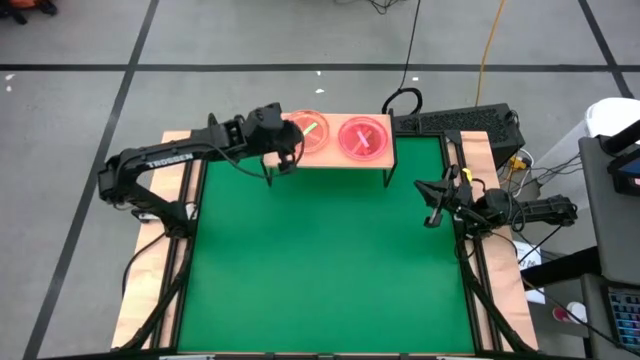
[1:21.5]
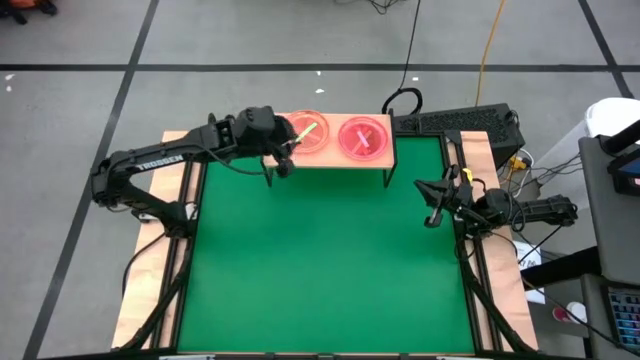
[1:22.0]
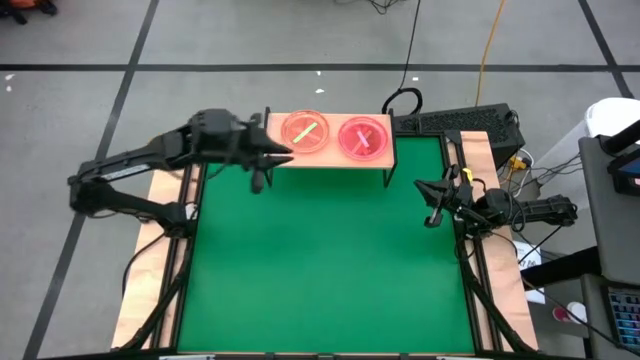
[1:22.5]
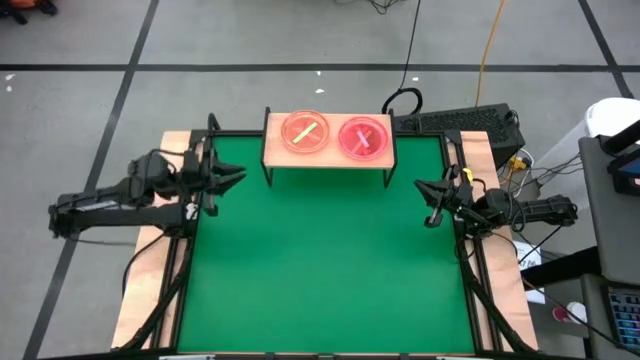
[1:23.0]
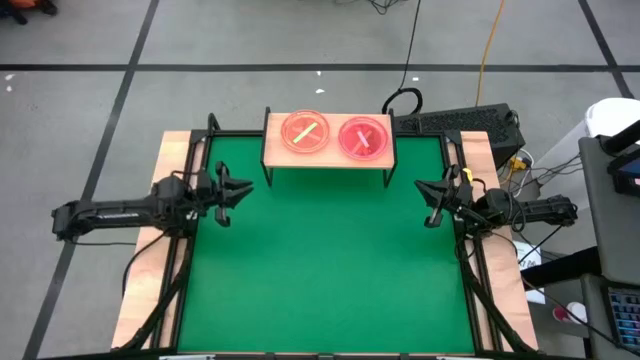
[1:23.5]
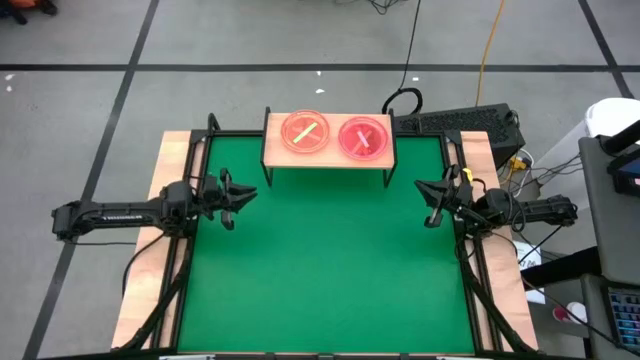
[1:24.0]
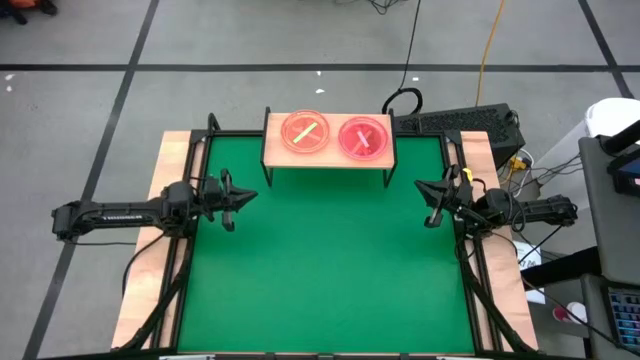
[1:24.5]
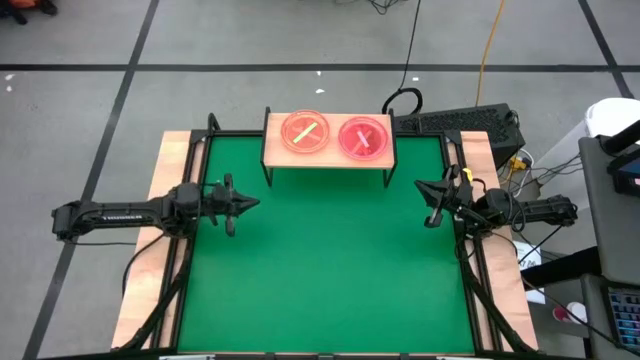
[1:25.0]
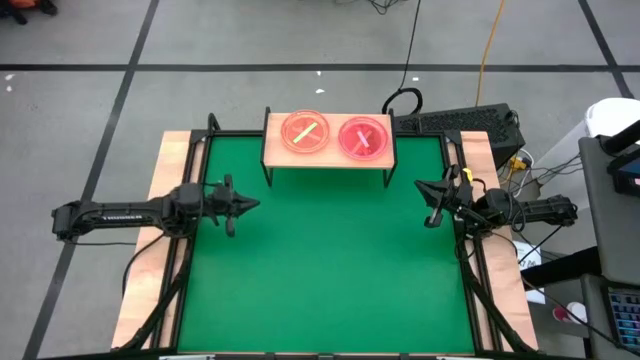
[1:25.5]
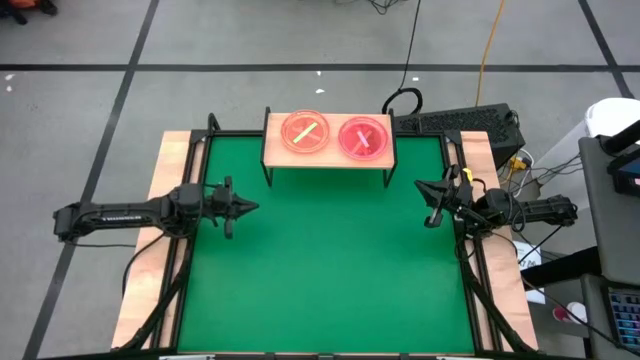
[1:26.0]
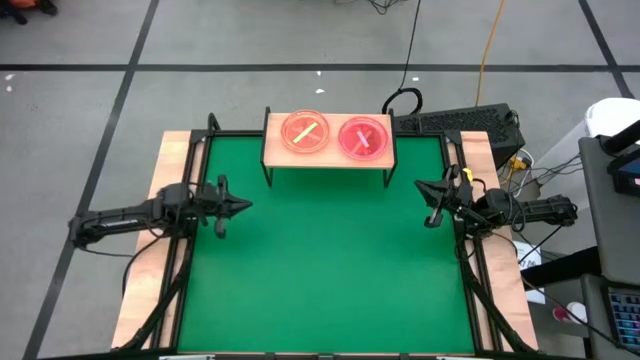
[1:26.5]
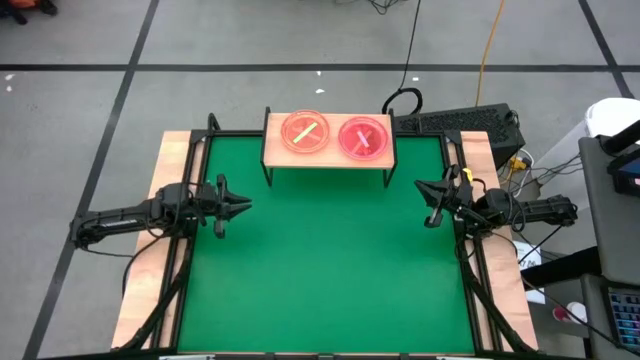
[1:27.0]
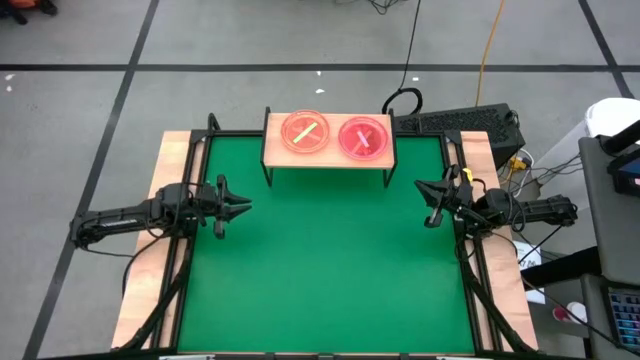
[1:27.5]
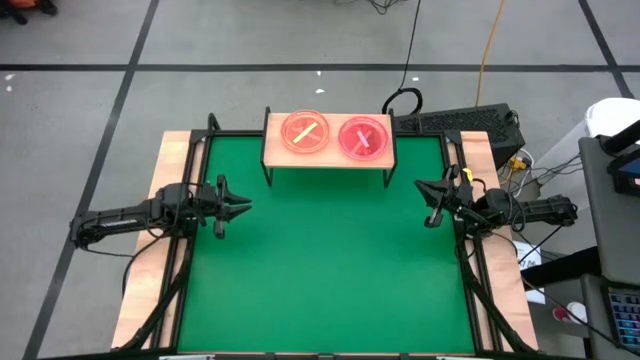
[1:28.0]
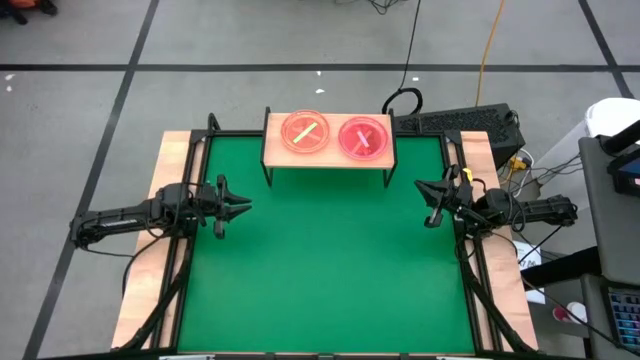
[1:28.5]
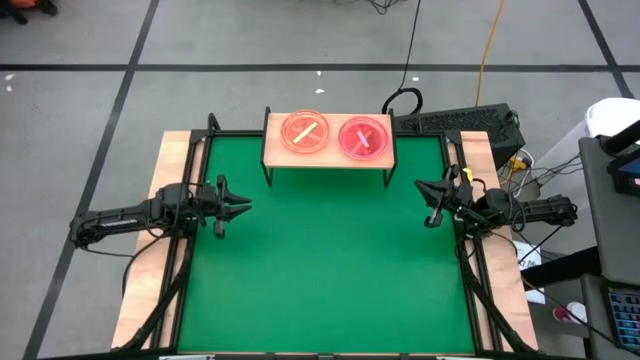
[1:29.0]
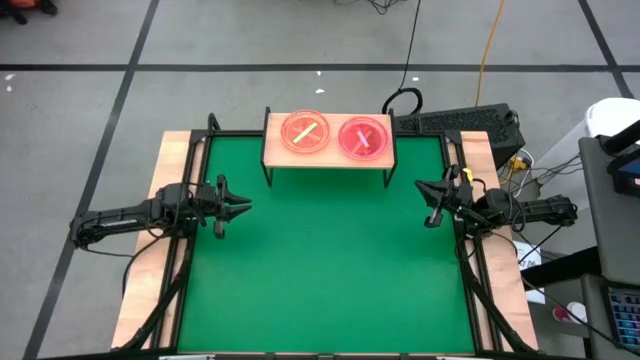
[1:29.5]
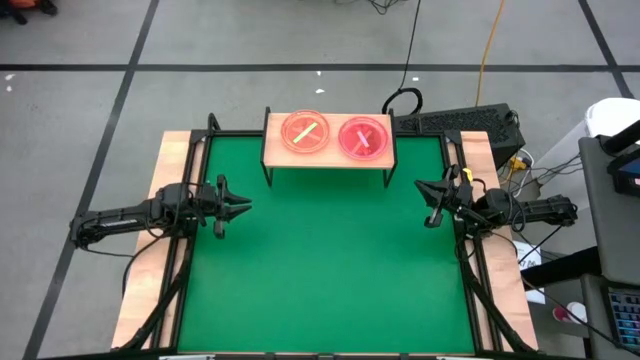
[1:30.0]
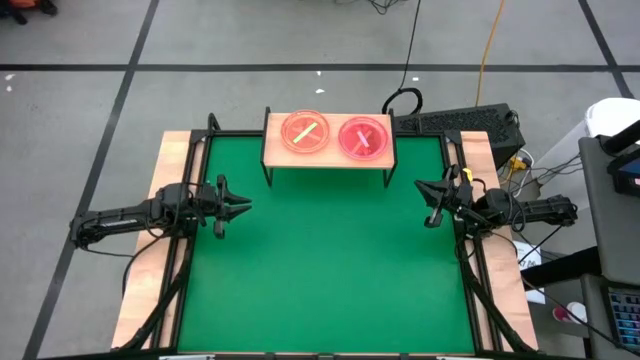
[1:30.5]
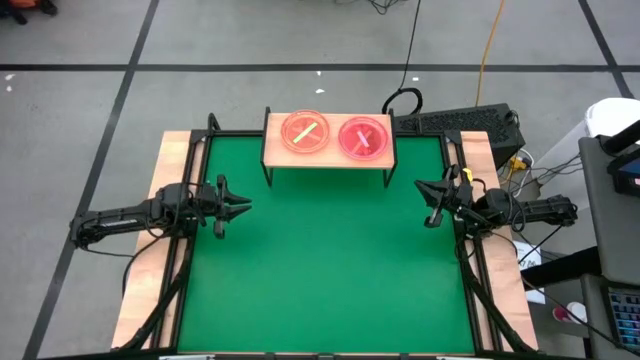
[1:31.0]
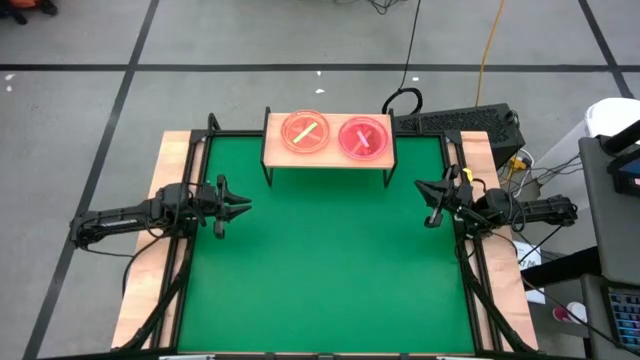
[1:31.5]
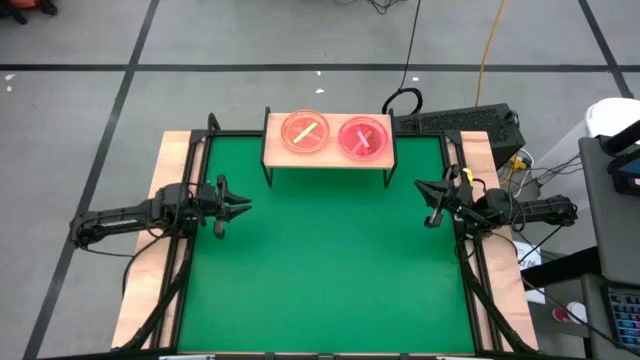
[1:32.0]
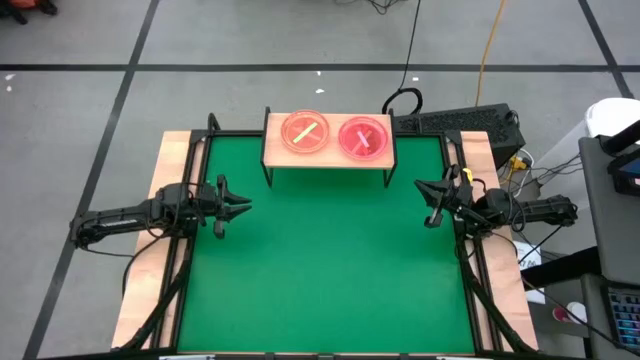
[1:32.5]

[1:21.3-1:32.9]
Task: Place and stack plates onto a shelf
Return to Home Position

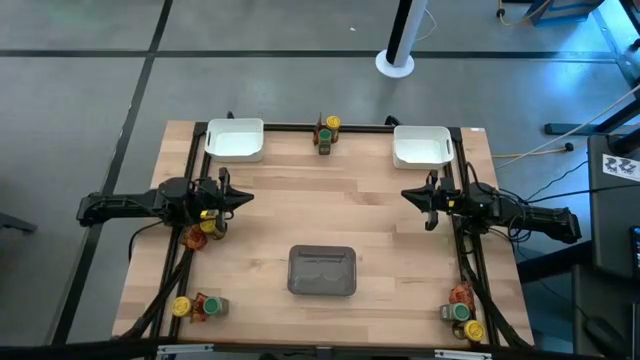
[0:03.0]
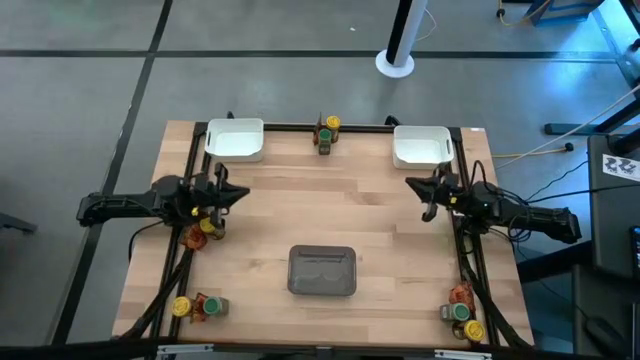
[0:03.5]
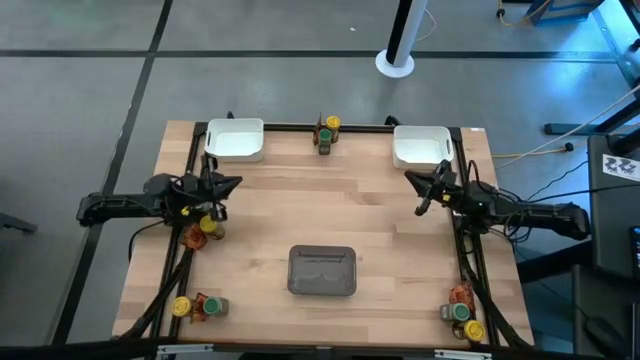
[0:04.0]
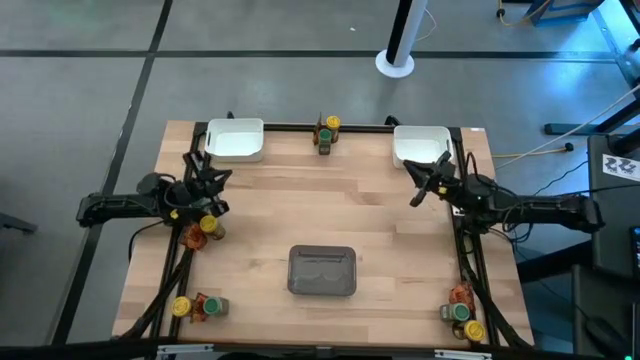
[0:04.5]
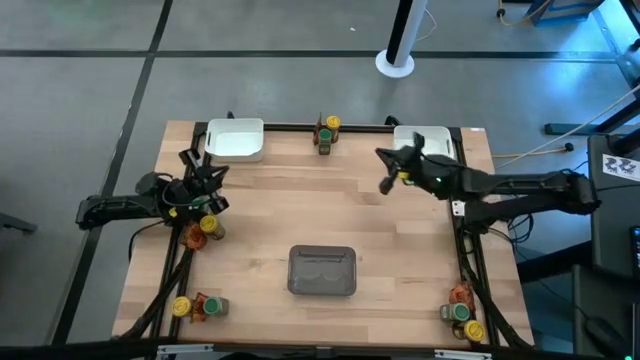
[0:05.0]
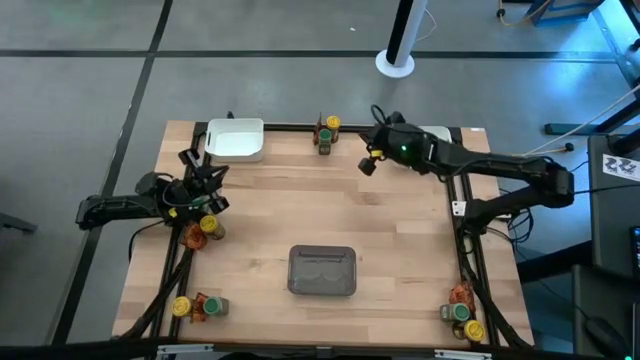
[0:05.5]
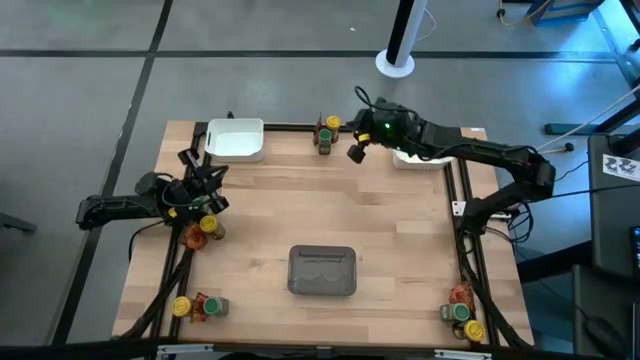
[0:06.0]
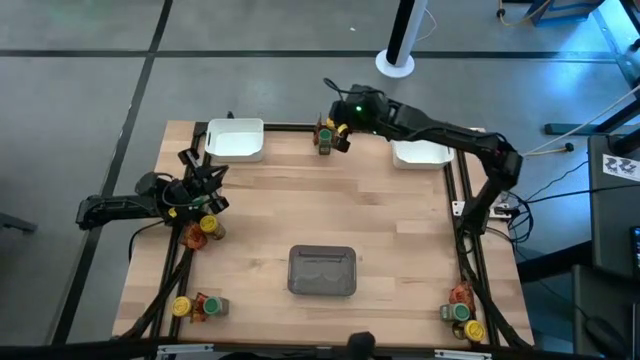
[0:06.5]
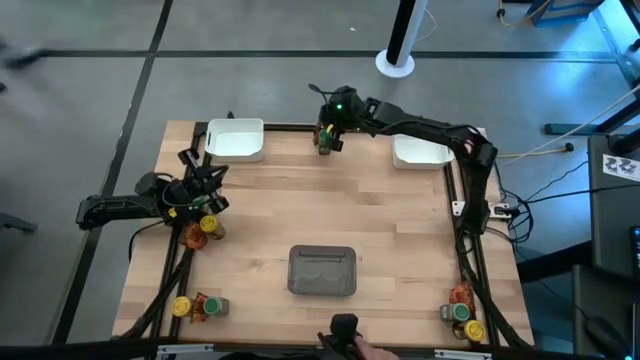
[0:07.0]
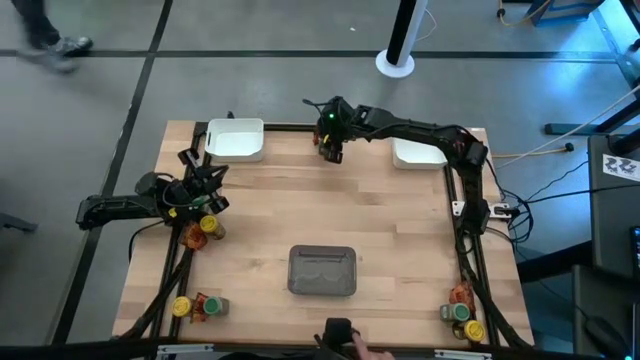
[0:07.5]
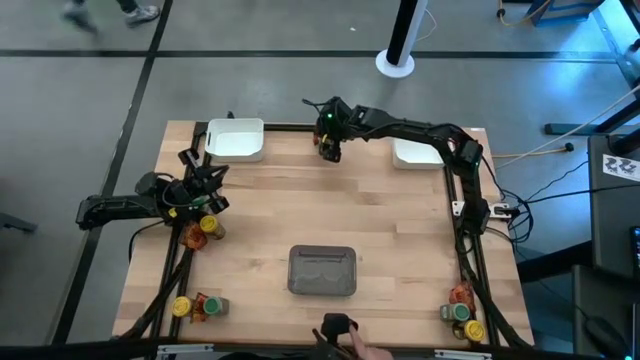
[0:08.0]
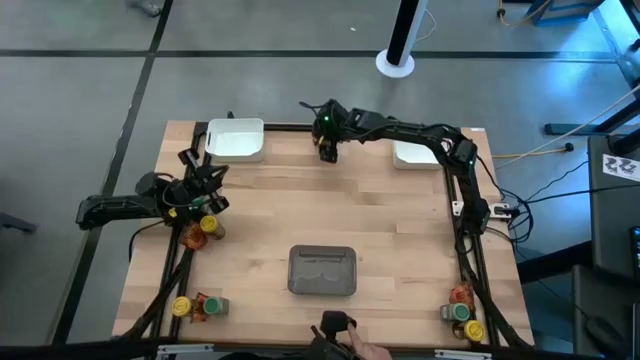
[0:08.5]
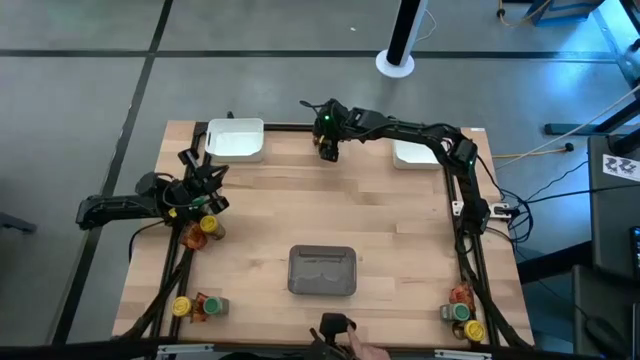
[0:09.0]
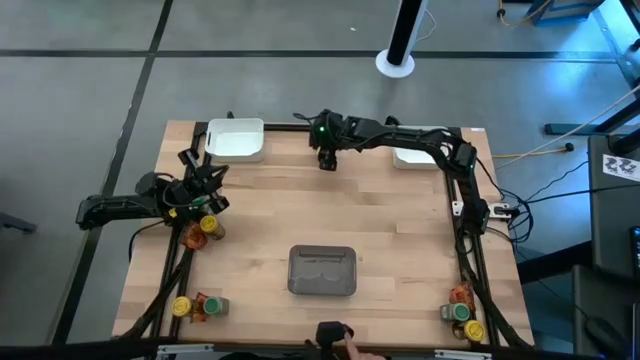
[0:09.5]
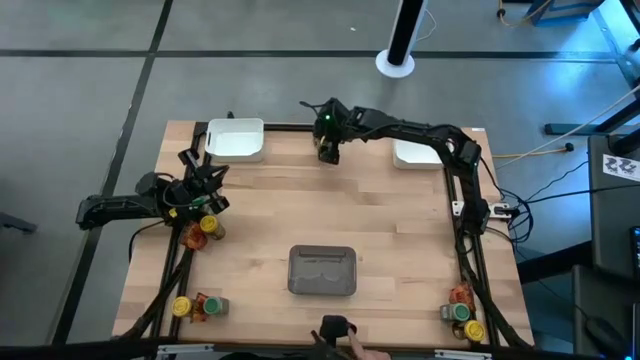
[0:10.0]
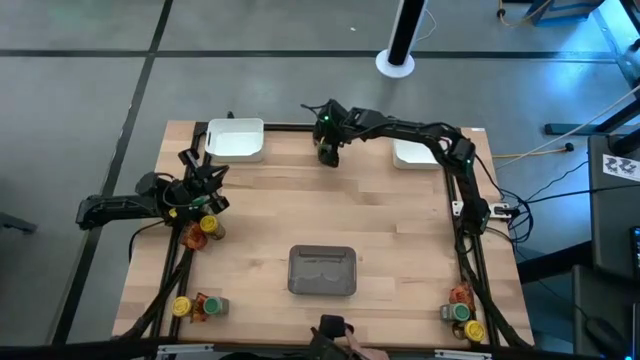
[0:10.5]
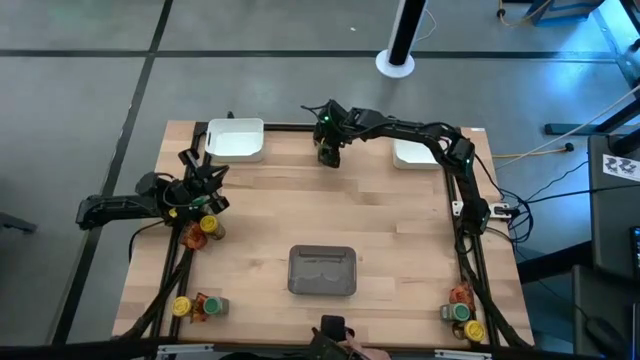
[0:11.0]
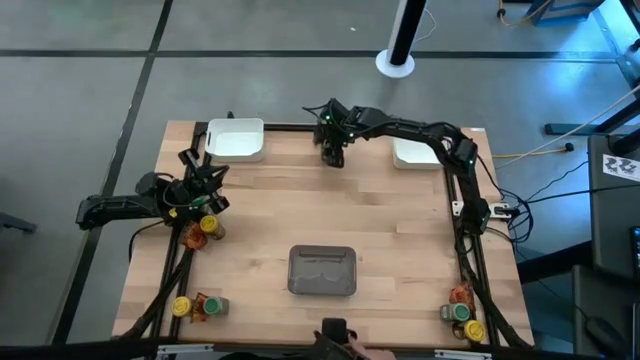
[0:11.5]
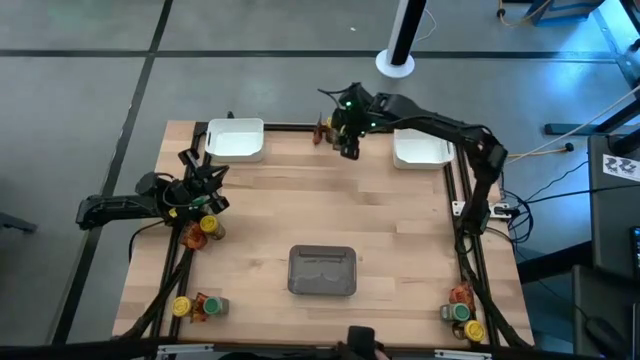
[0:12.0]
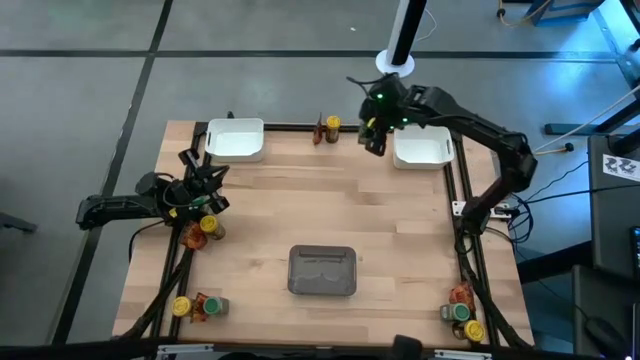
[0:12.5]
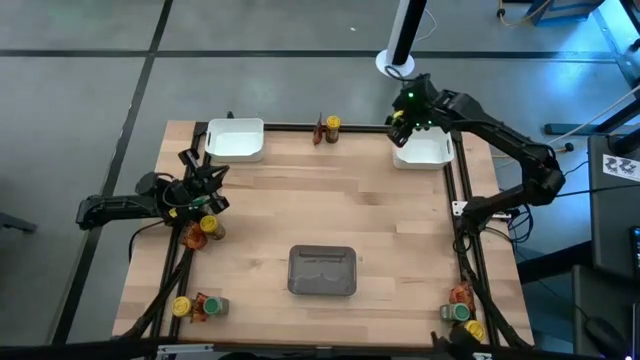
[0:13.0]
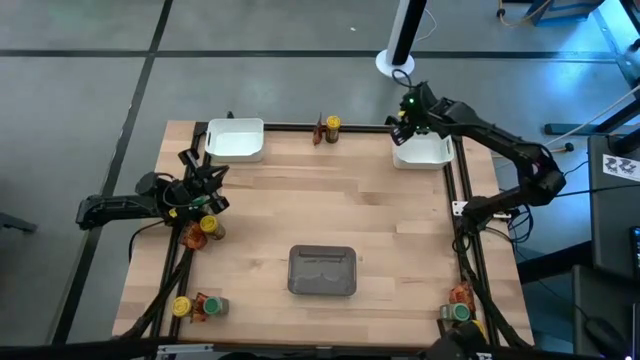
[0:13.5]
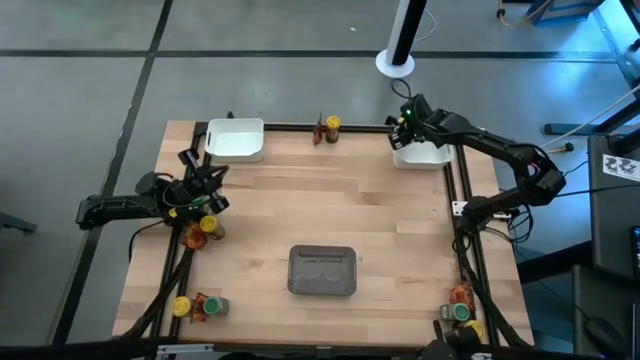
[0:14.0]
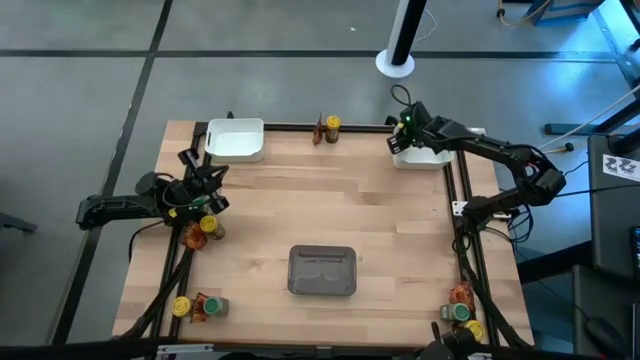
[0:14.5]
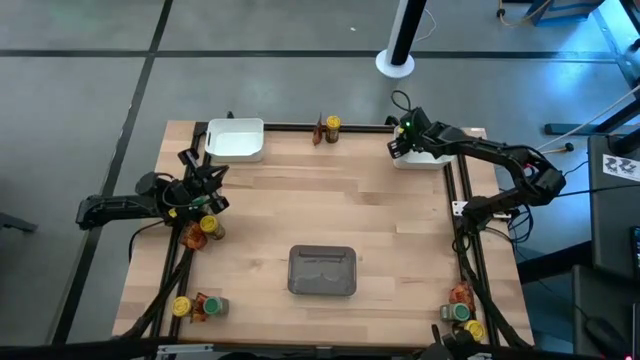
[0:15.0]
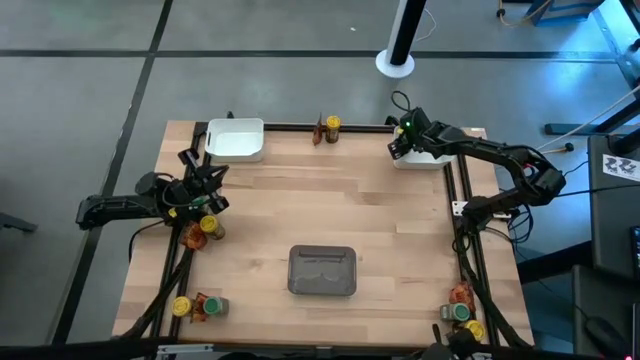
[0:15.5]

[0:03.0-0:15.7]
Task: Sort spices by type
Put the top center green seasoning bottle into the right white bin
